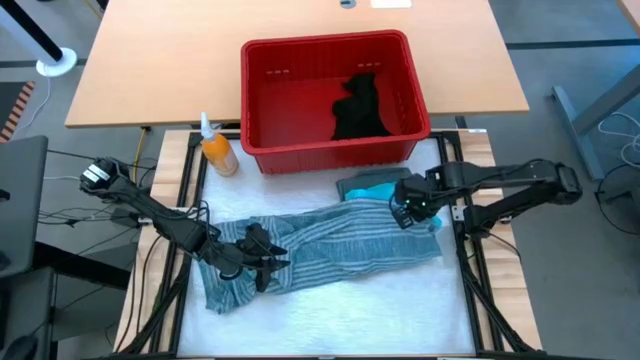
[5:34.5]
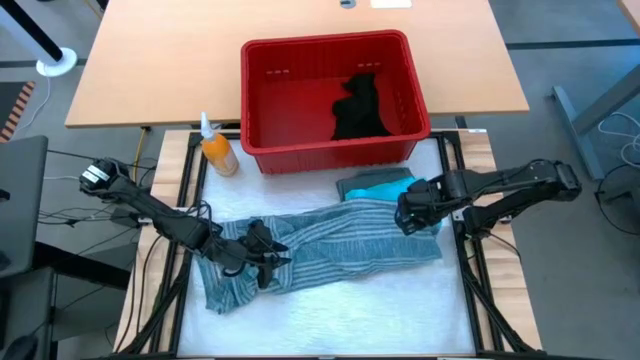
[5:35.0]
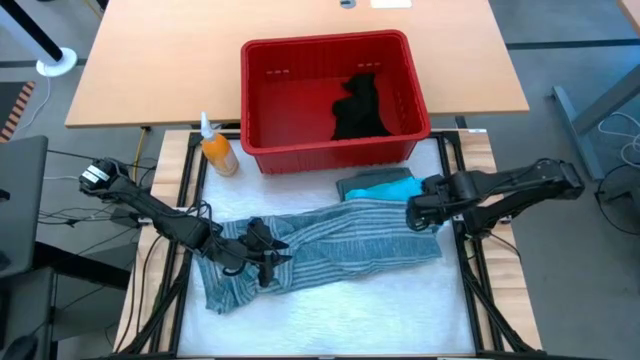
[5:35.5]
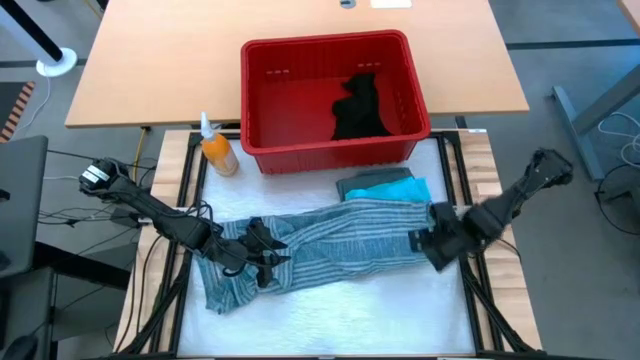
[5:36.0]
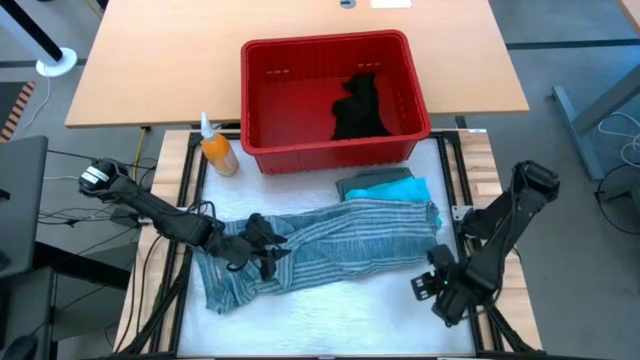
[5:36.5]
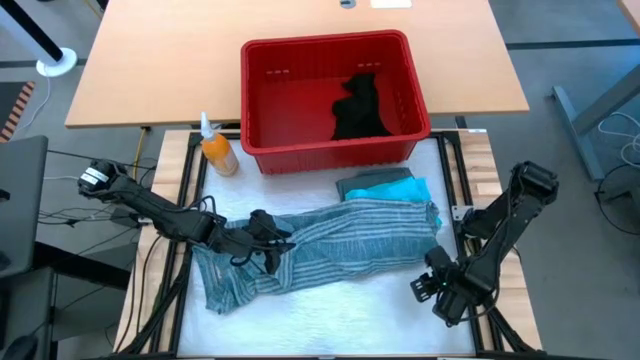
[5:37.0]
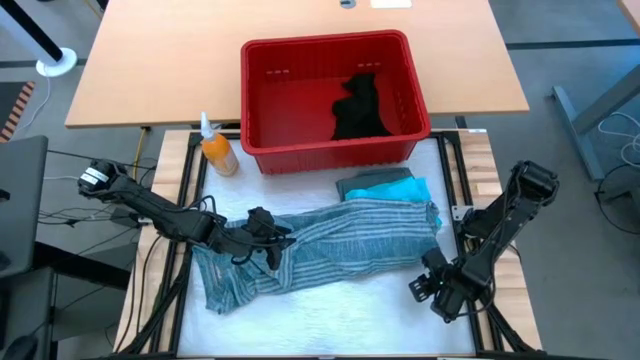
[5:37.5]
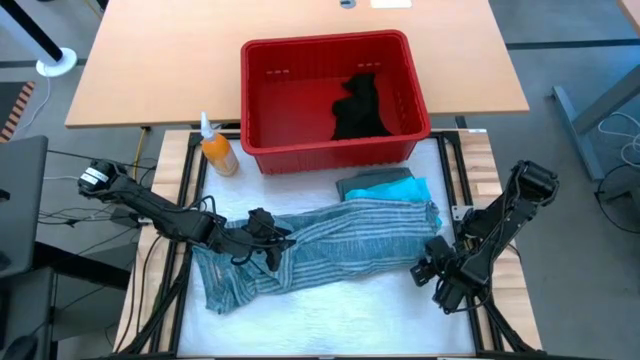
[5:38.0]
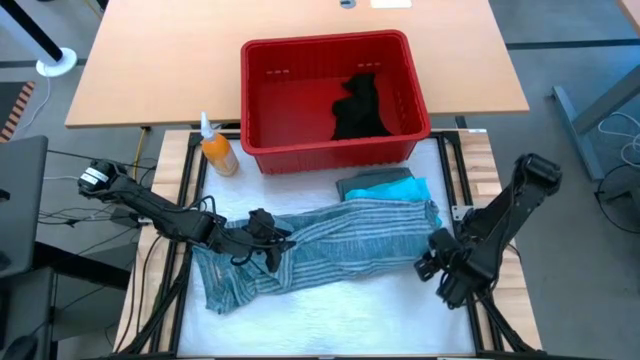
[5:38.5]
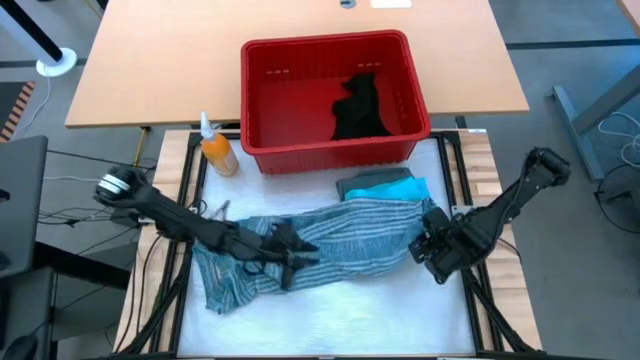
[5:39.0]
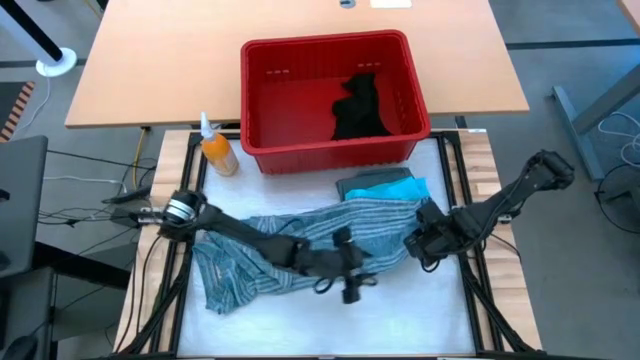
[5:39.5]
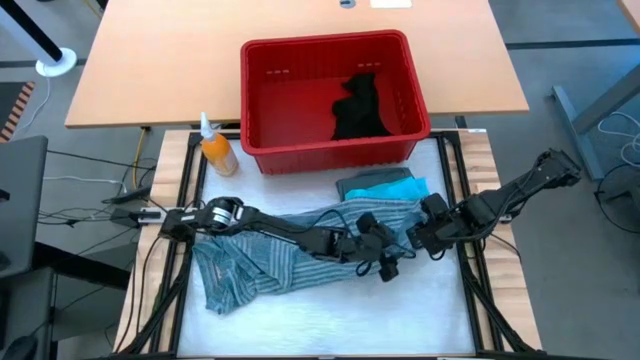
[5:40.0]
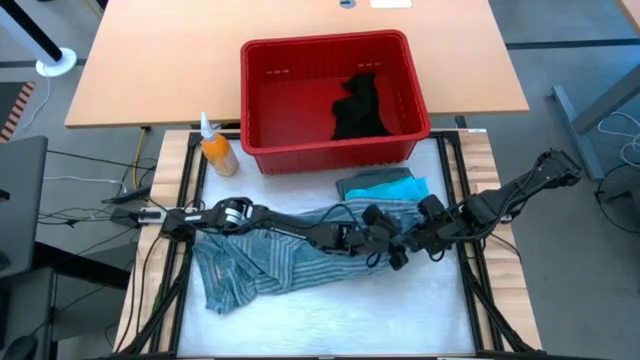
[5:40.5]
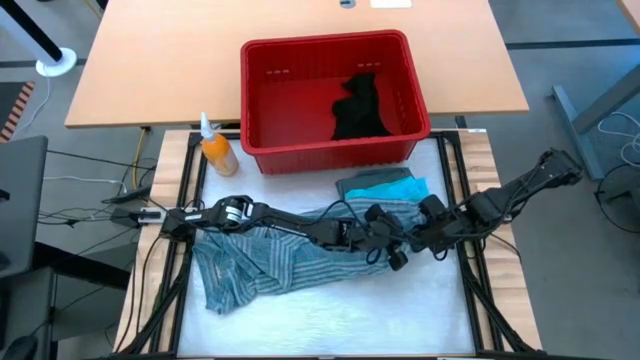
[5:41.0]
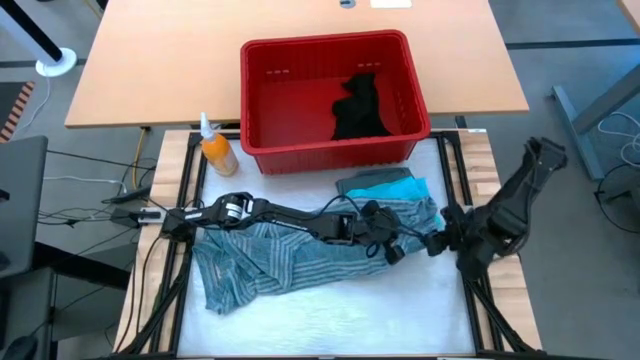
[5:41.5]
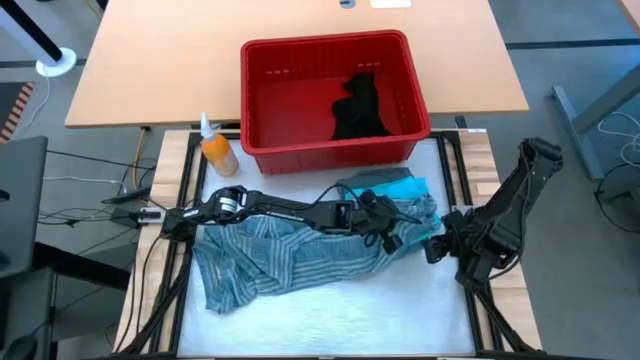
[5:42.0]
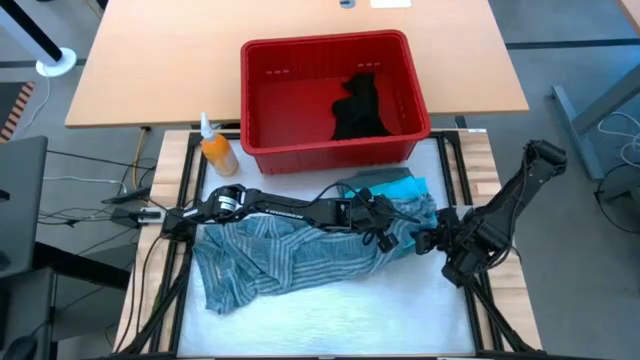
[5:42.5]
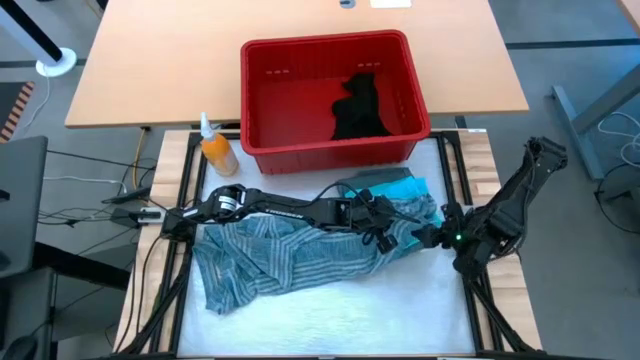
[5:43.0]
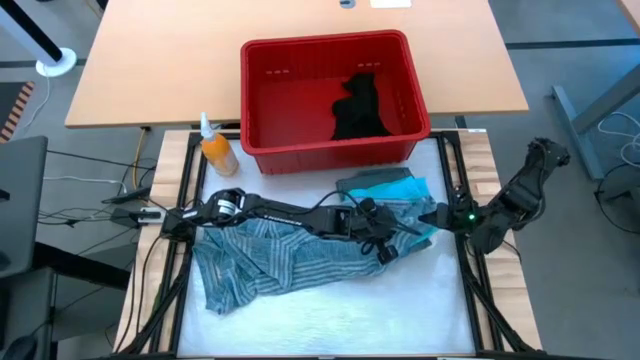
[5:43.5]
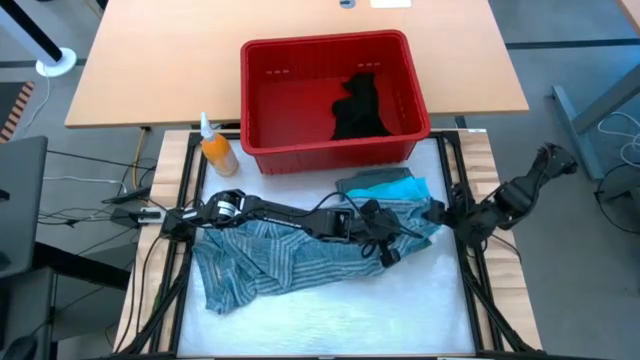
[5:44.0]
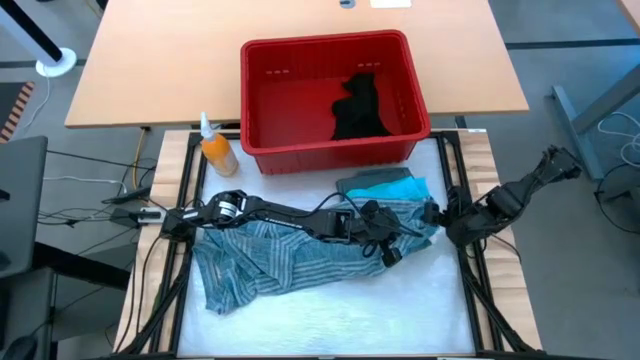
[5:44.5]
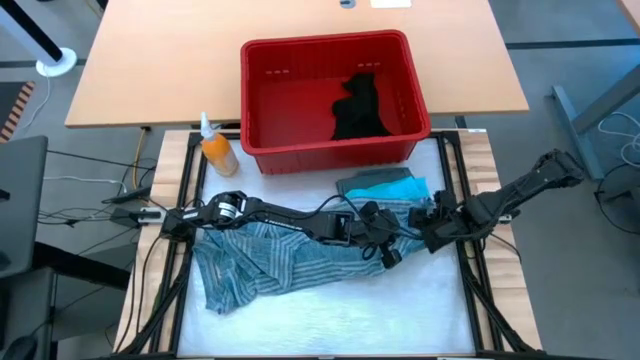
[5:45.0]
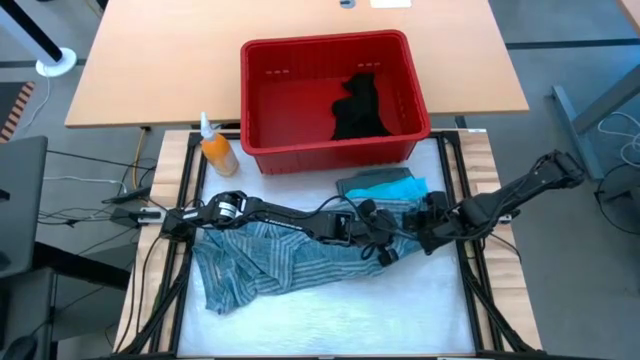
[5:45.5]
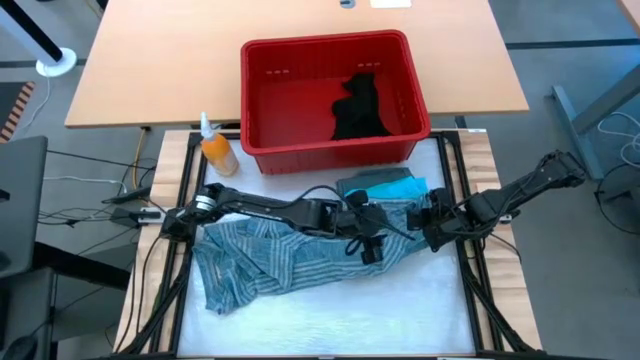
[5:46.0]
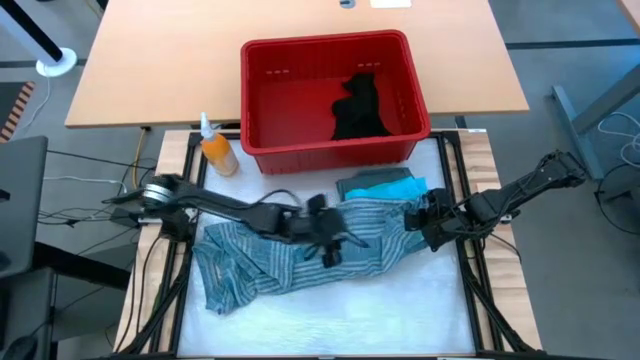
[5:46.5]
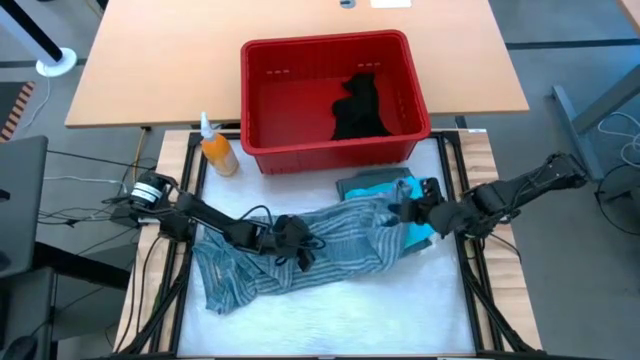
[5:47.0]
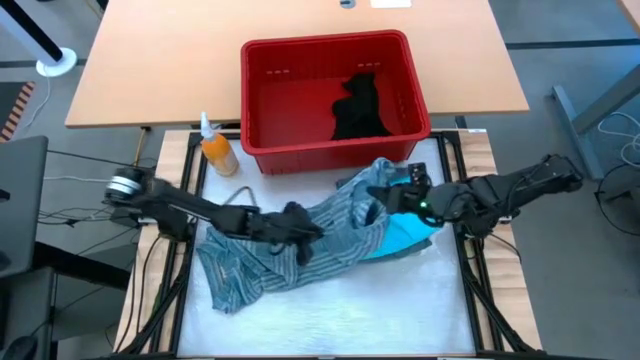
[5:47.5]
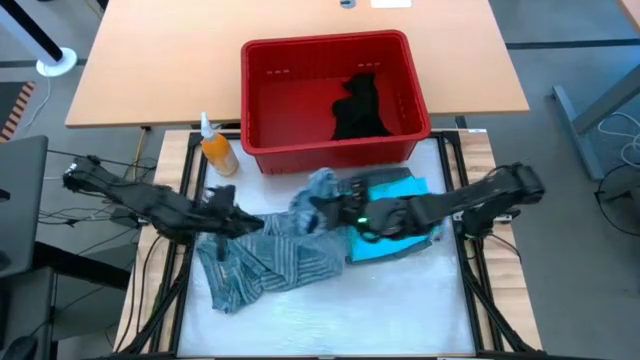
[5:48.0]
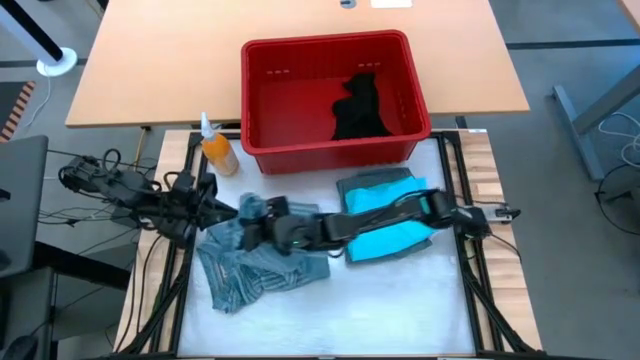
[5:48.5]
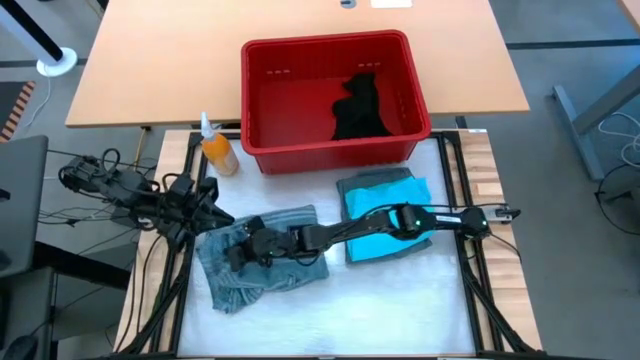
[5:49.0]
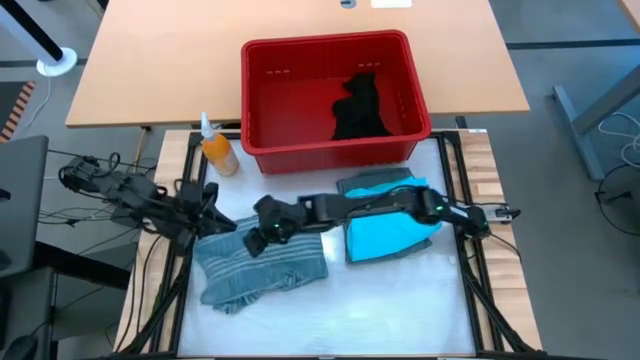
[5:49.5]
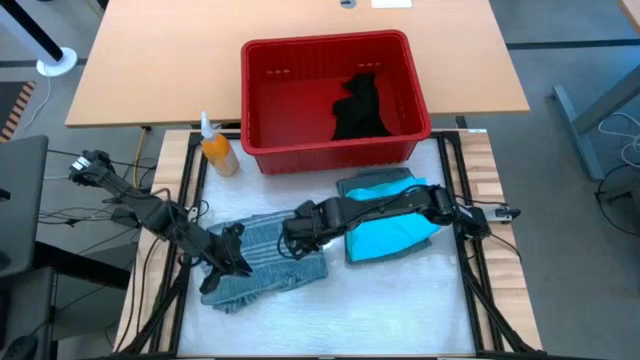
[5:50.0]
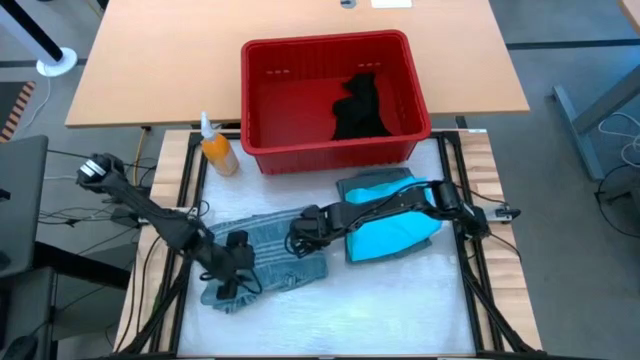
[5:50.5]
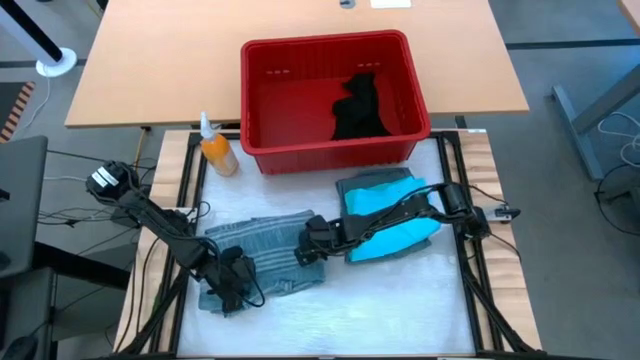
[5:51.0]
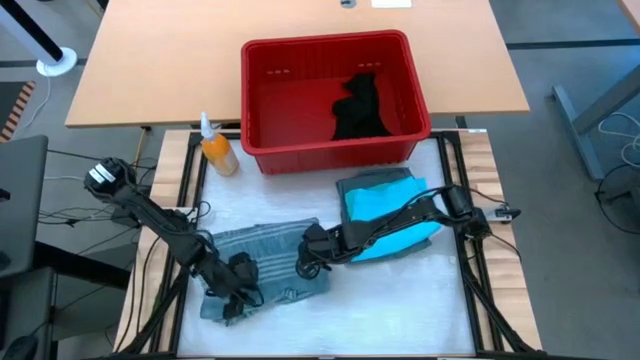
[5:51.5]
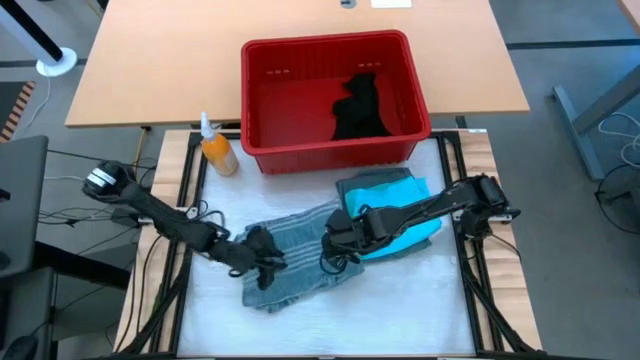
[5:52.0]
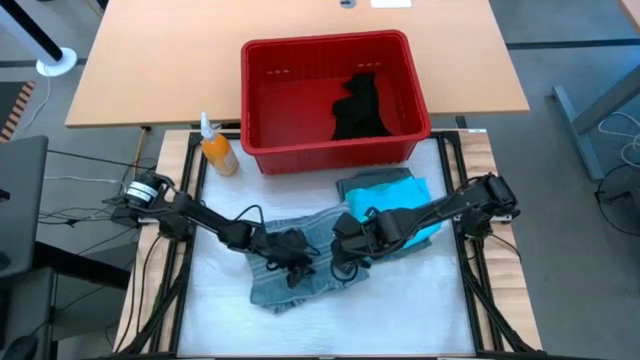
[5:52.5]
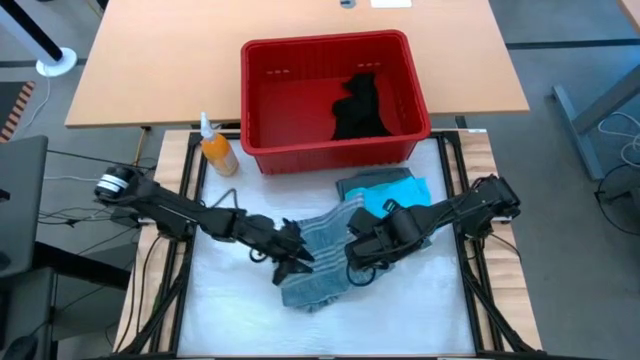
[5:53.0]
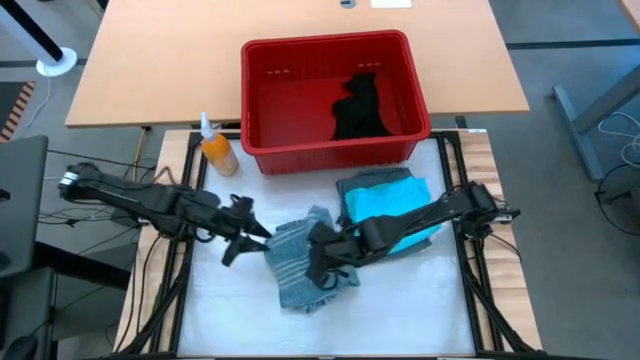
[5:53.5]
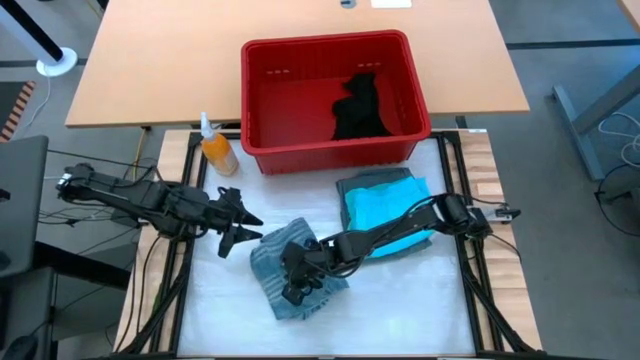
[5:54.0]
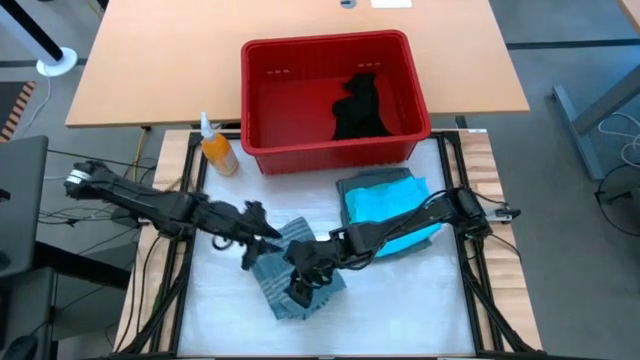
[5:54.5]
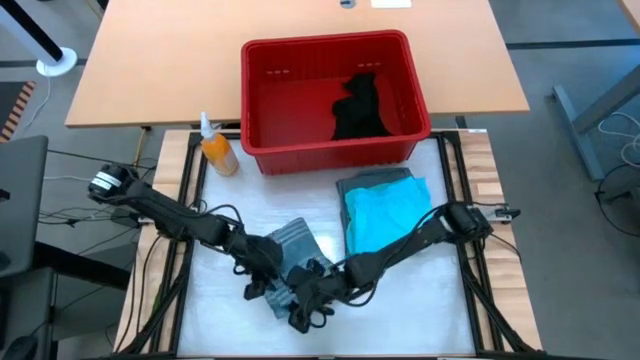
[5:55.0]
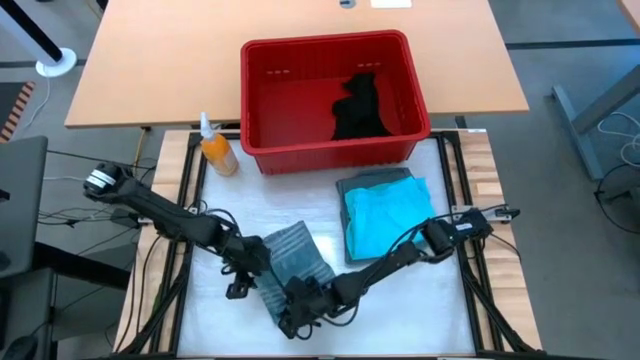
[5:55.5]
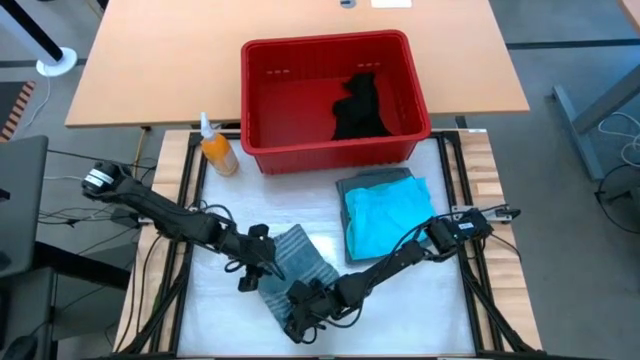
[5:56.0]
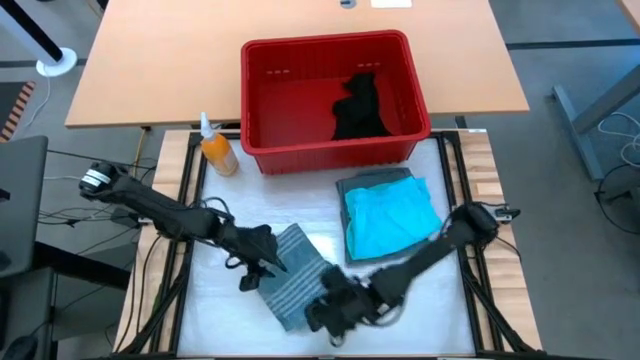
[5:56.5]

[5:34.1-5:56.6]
Task: Fold Laundry from Bin
Fold the blue patterned polo shirt
